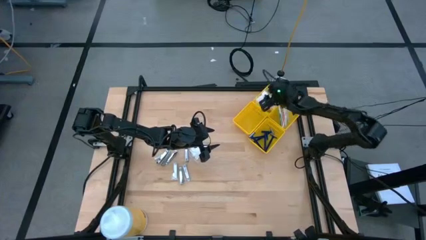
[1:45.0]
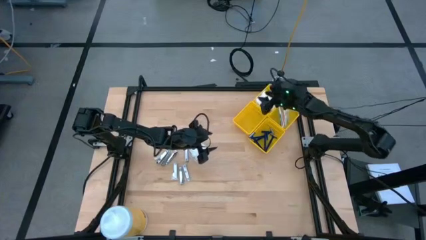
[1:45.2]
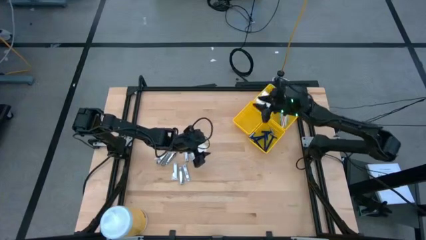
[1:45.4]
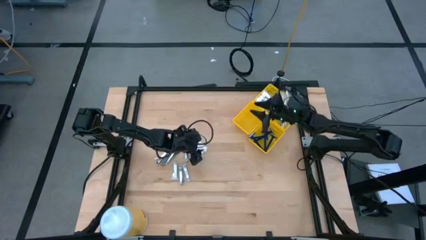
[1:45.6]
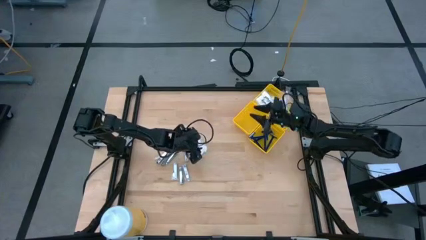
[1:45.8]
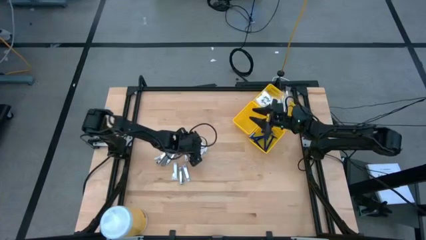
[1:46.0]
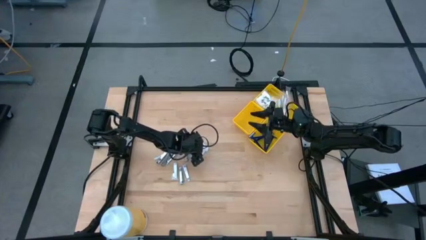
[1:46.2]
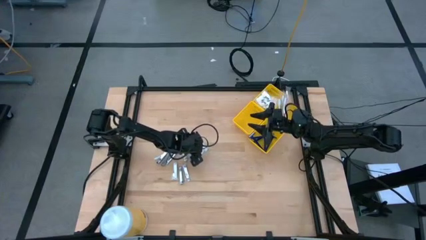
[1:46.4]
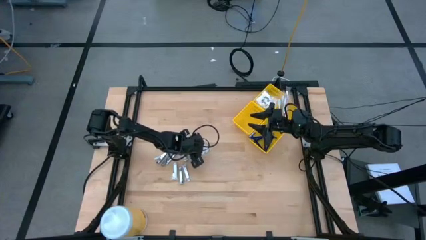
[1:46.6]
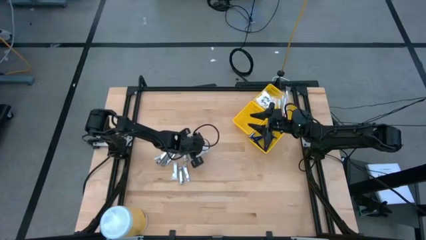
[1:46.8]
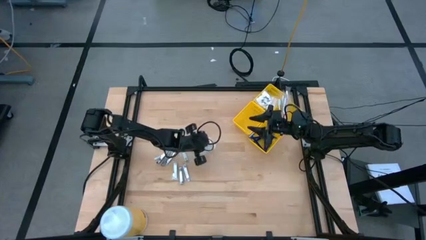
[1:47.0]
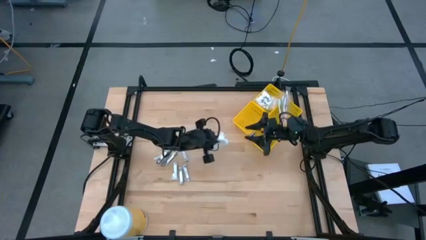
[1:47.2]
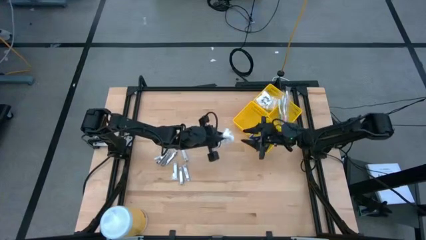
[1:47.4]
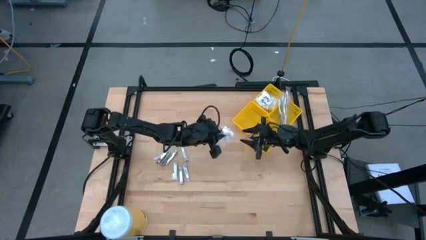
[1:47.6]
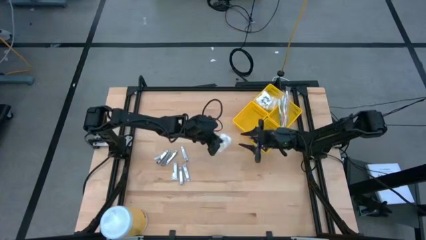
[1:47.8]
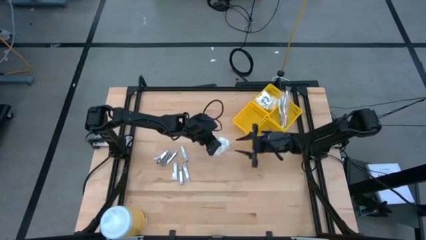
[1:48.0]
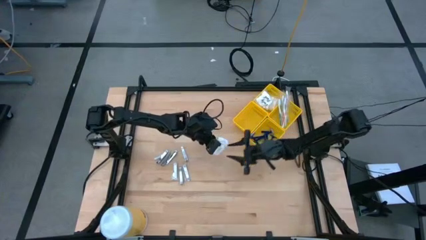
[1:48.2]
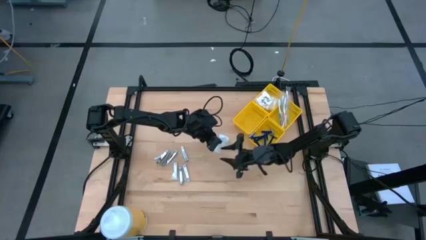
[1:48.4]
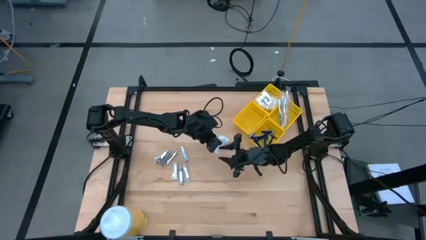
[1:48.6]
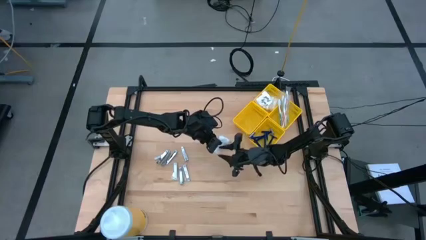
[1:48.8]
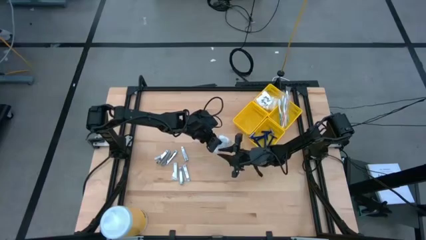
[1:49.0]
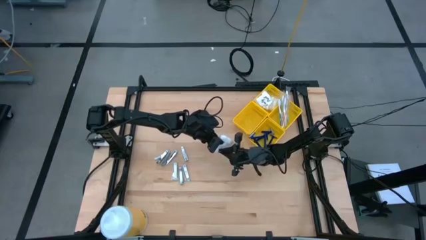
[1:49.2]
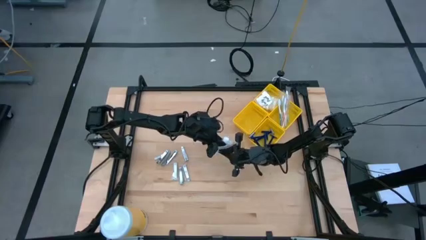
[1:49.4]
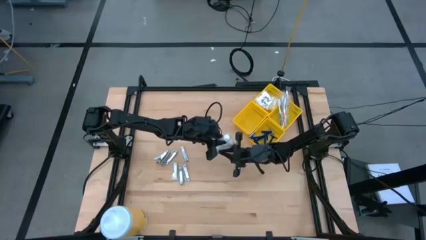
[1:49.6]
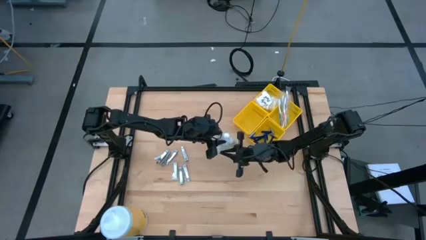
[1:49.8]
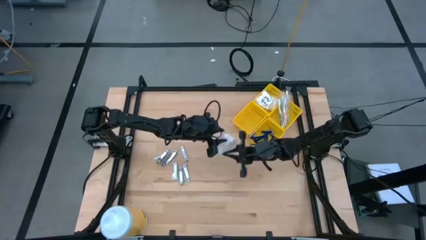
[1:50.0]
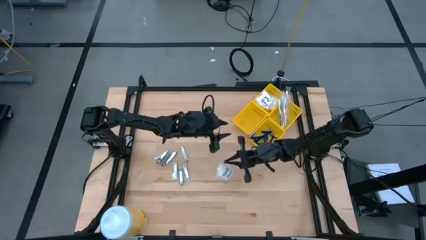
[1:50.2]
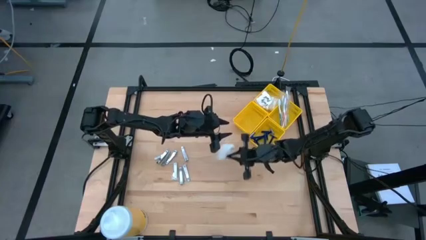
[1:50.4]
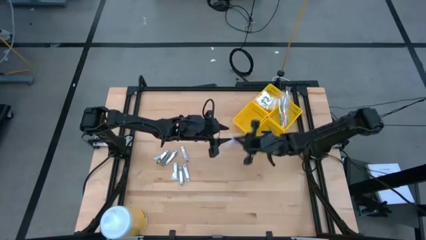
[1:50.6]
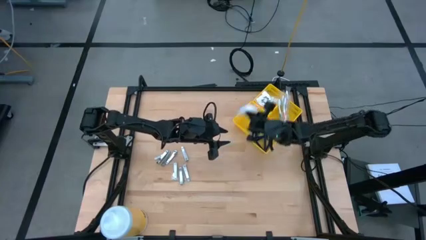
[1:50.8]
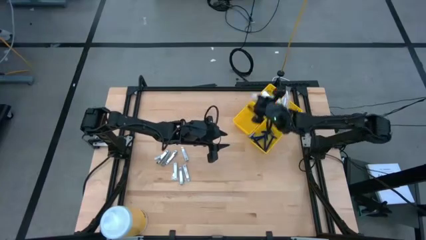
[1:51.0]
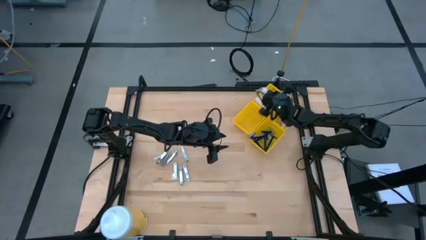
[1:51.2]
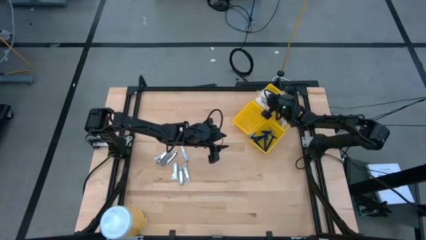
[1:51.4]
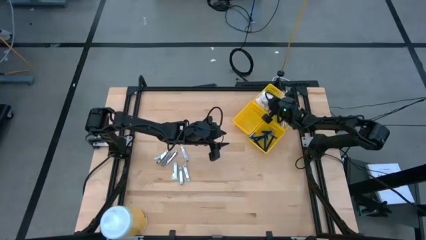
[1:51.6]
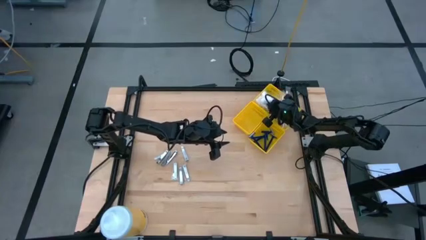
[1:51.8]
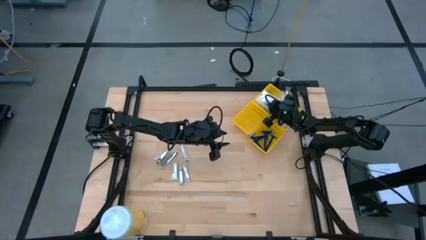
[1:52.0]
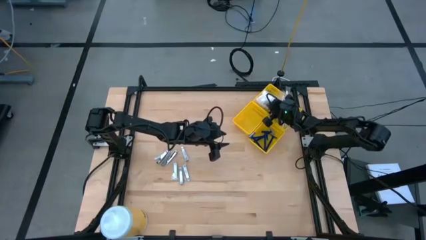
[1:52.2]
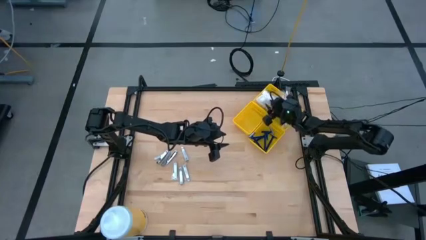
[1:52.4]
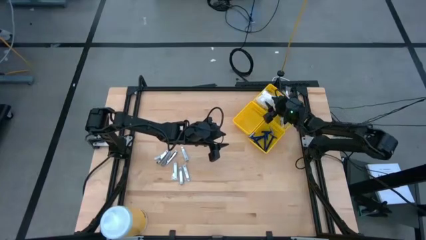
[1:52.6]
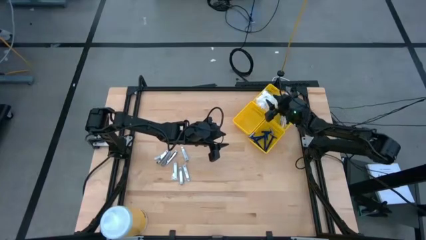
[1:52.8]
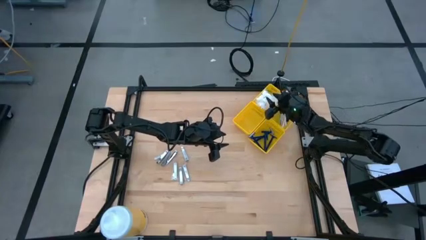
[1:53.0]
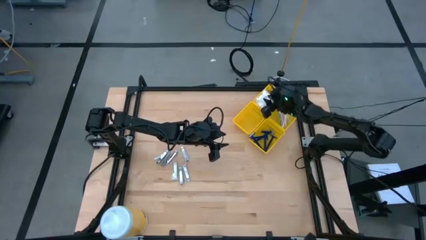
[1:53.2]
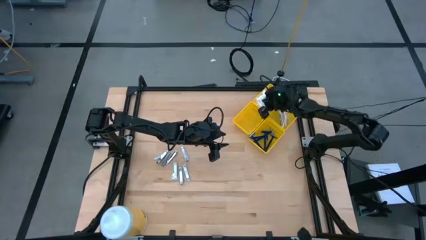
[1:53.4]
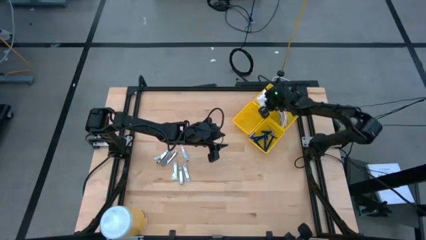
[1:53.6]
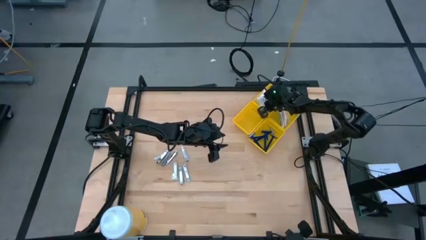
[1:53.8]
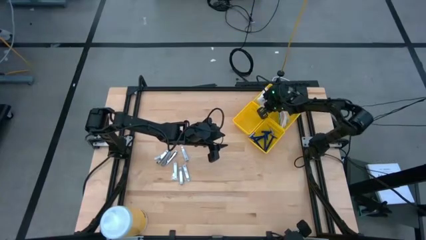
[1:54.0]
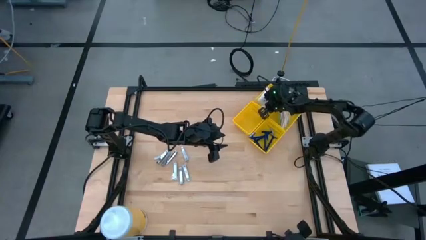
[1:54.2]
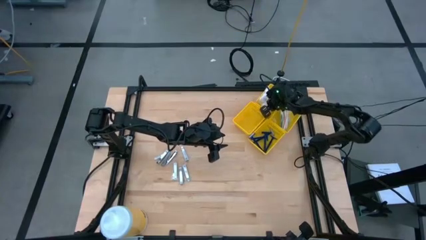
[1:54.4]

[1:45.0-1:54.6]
Task: Pick & Place Travel size toiletries
Put the cotton pack into the top left yellow bin

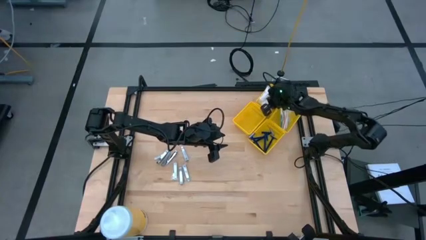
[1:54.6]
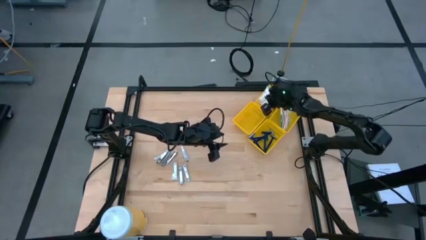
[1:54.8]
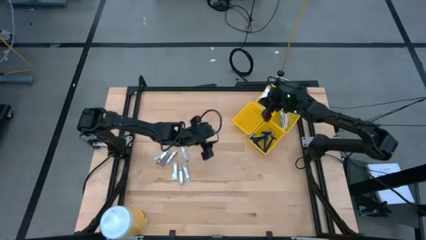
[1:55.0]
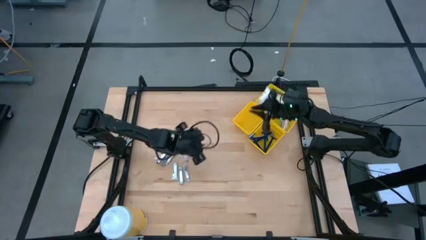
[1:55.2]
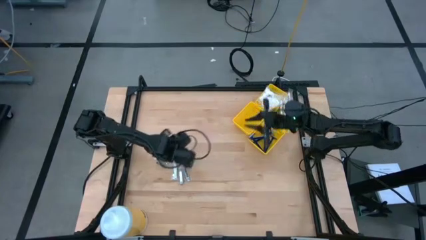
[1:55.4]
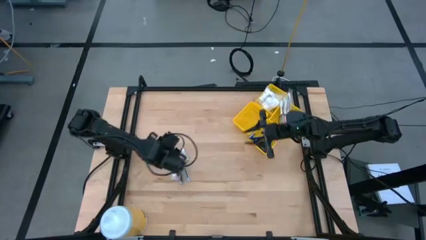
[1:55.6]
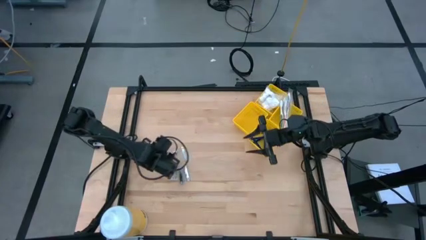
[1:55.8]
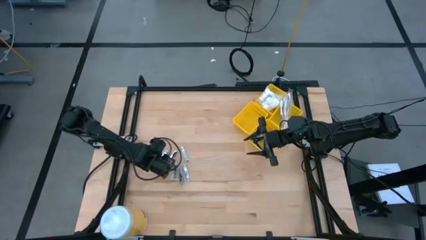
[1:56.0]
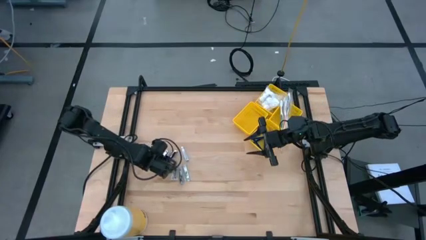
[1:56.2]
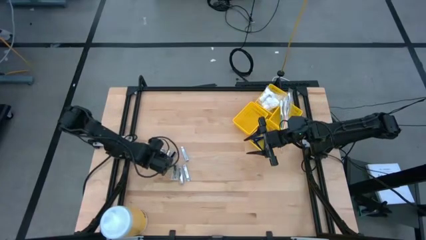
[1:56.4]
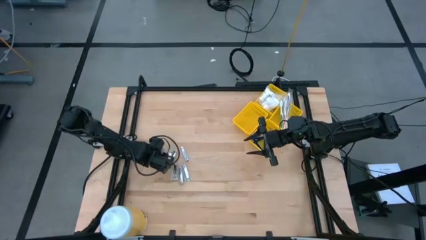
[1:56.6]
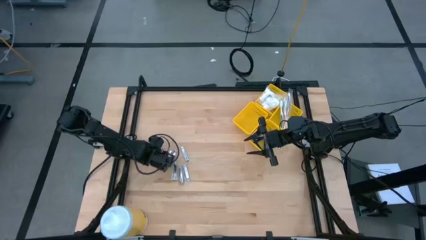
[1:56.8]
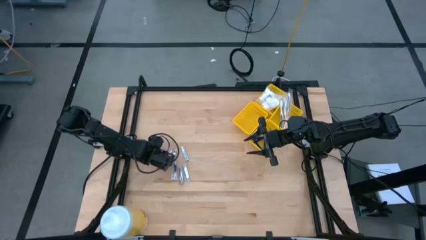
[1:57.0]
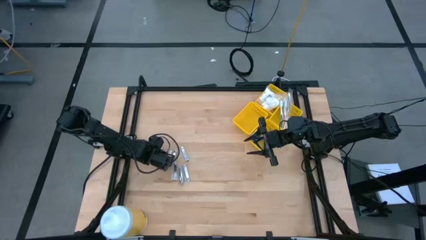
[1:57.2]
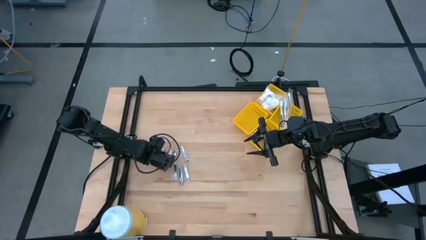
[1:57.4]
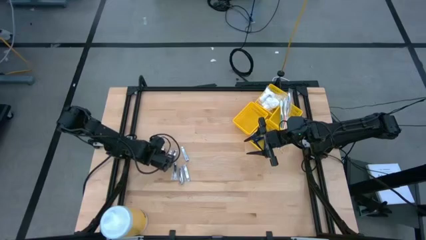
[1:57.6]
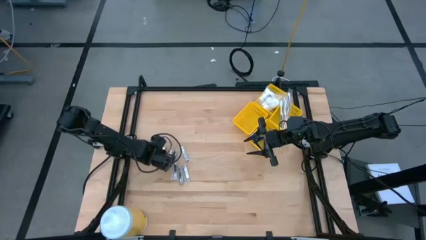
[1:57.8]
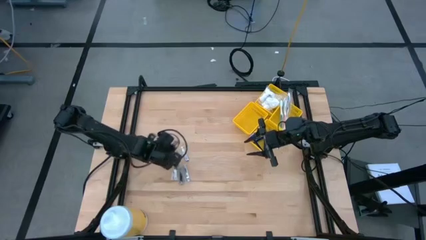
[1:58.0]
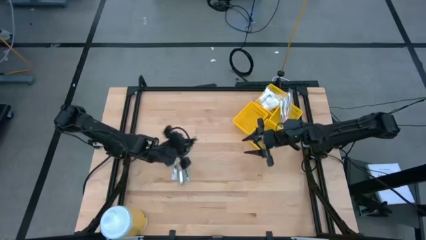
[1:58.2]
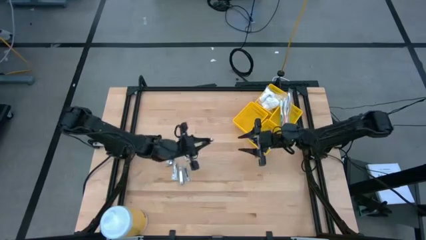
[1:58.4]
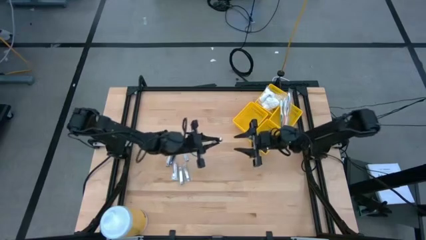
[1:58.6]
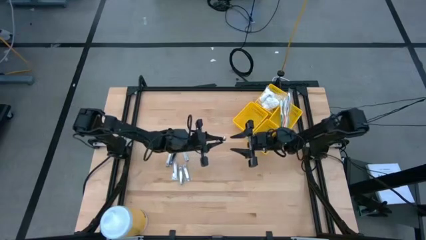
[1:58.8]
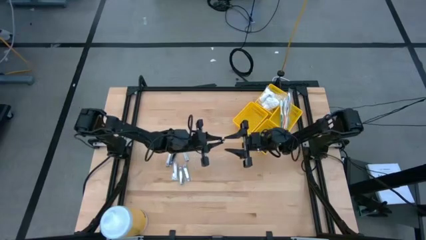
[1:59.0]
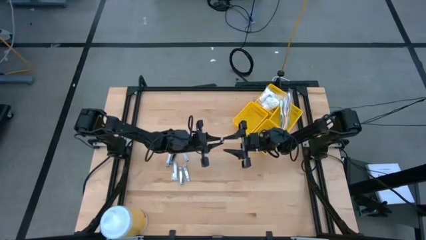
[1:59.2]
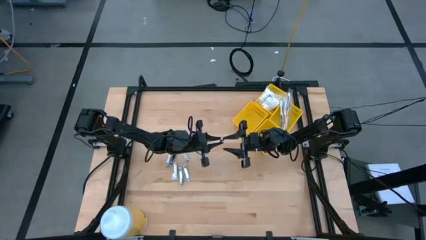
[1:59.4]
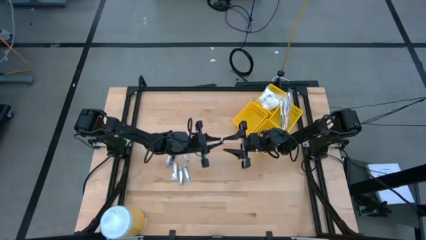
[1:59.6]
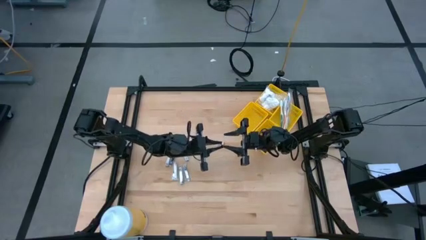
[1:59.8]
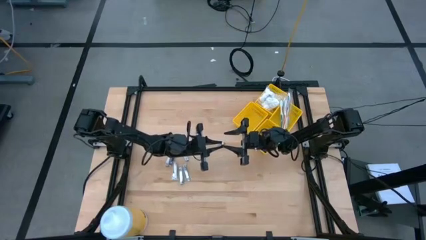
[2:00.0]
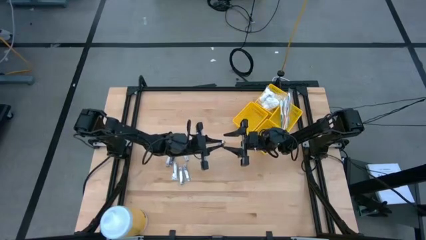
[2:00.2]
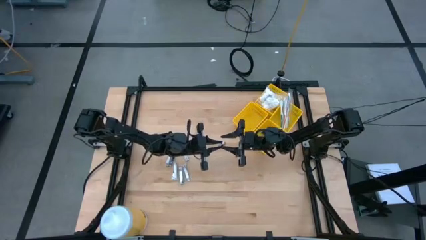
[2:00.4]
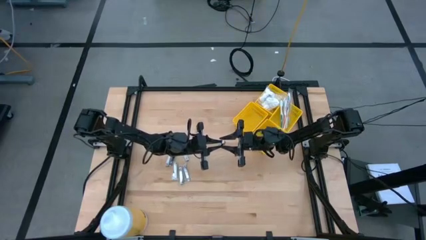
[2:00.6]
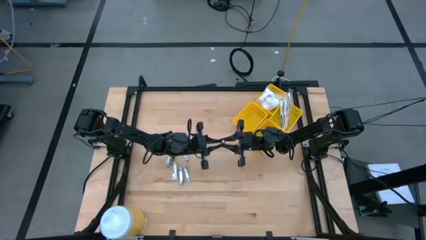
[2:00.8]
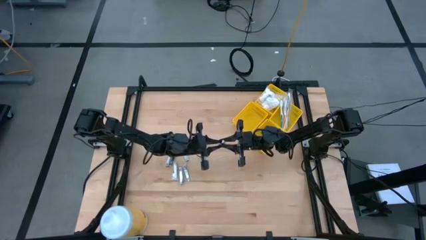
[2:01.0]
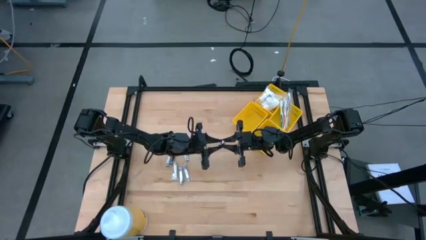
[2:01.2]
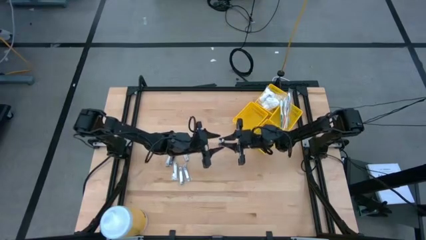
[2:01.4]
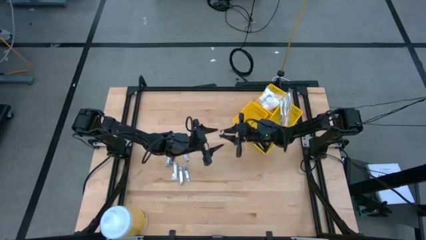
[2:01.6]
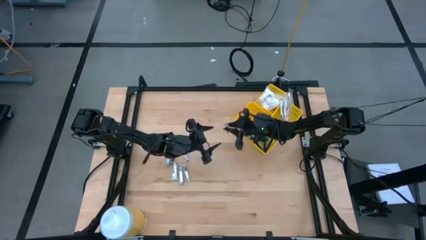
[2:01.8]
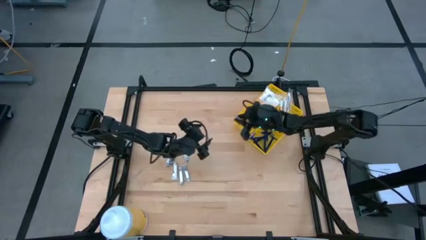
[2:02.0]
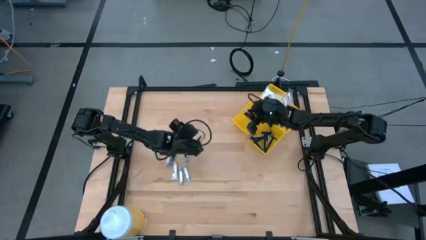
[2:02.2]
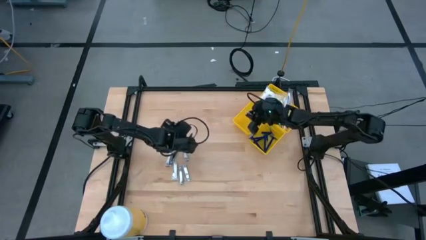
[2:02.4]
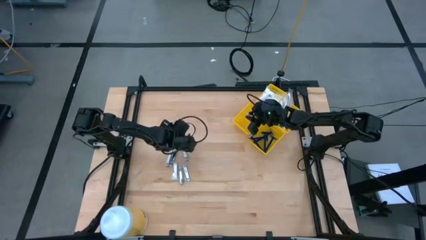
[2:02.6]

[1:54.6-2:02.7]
Put the nail cutter into the bottom left yellow bin
